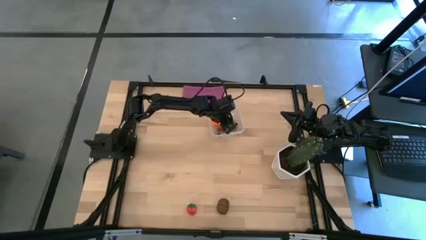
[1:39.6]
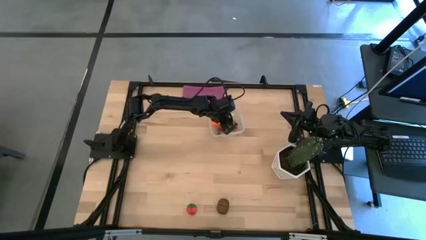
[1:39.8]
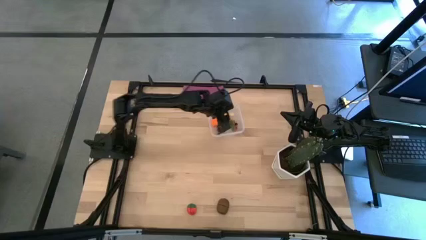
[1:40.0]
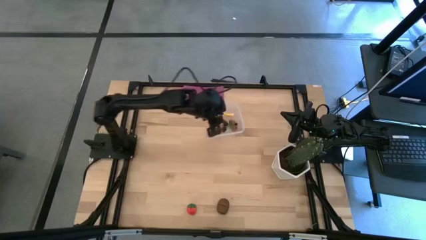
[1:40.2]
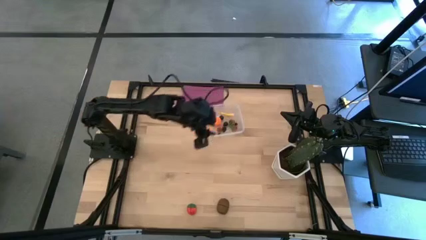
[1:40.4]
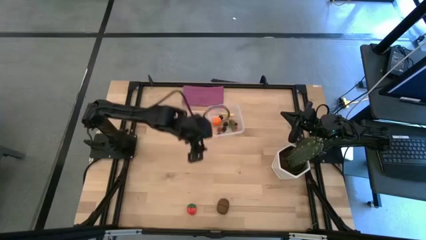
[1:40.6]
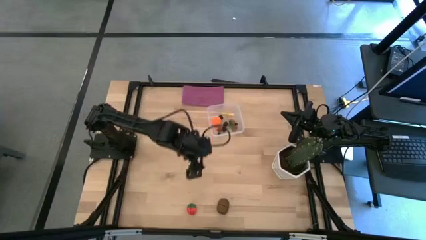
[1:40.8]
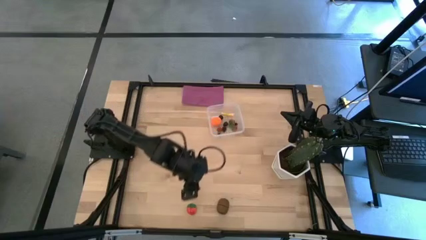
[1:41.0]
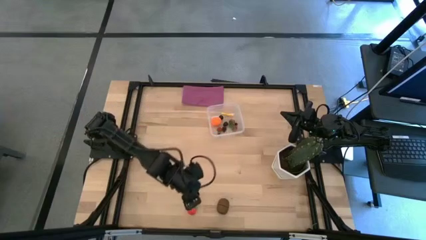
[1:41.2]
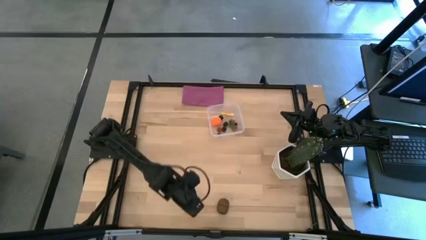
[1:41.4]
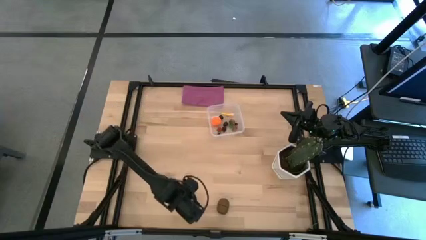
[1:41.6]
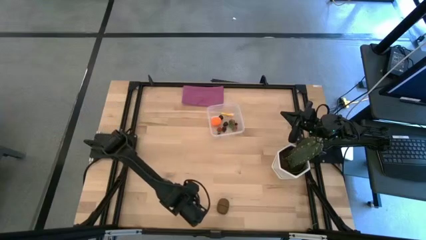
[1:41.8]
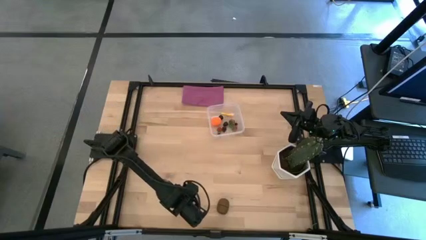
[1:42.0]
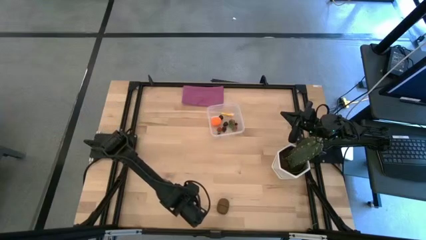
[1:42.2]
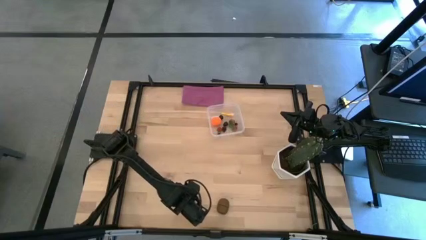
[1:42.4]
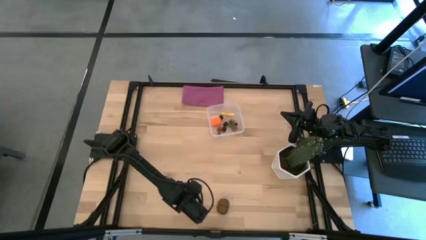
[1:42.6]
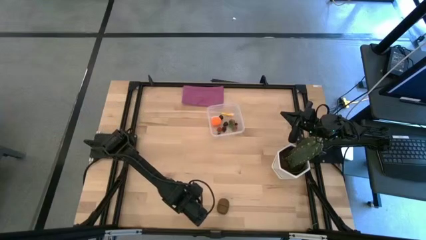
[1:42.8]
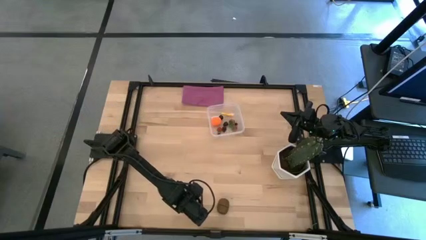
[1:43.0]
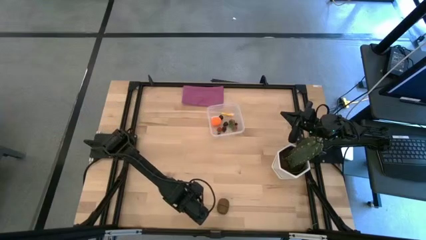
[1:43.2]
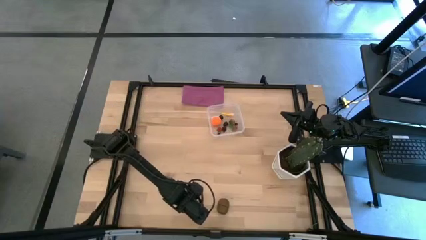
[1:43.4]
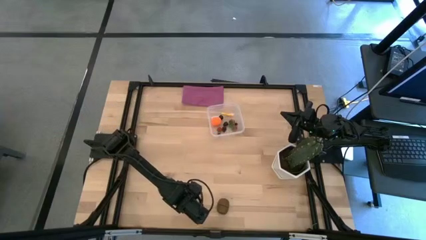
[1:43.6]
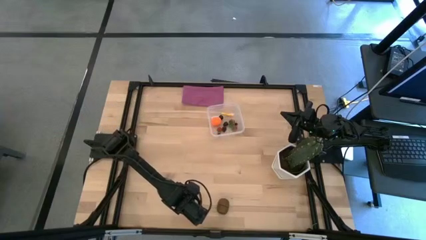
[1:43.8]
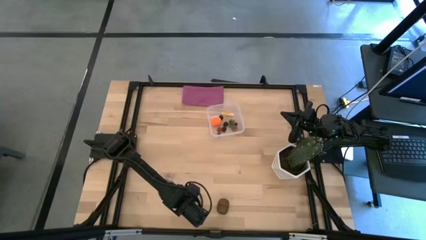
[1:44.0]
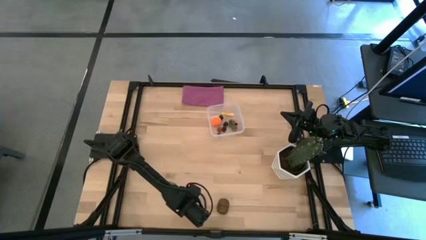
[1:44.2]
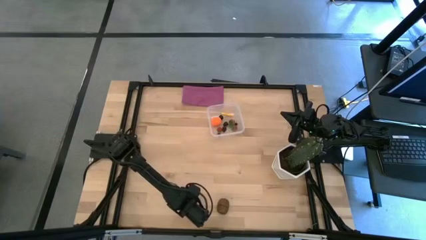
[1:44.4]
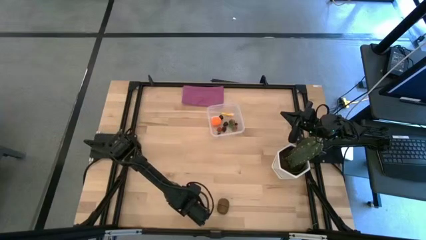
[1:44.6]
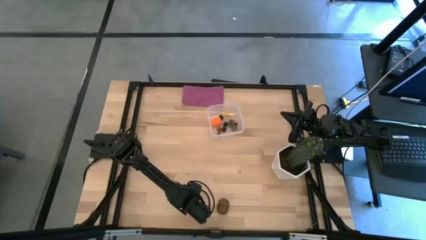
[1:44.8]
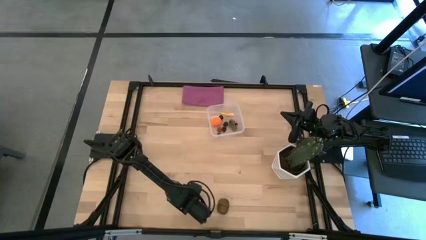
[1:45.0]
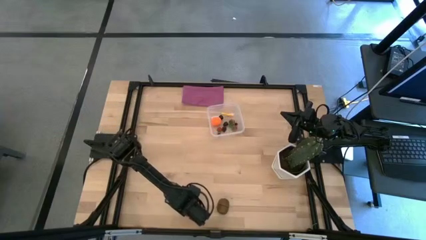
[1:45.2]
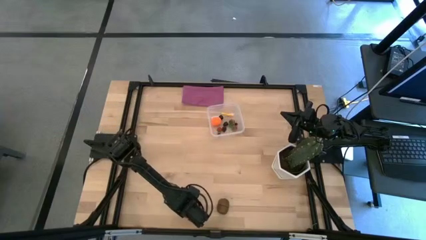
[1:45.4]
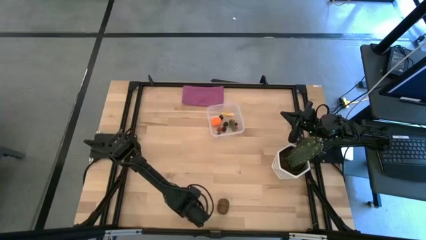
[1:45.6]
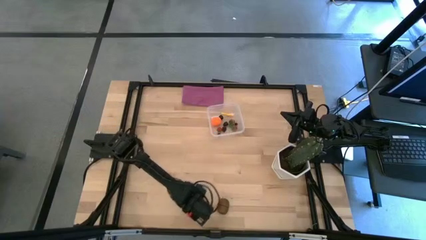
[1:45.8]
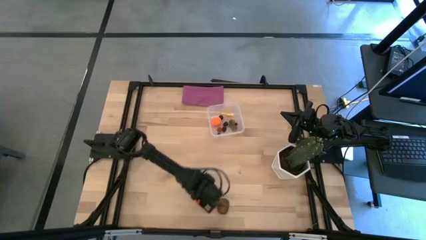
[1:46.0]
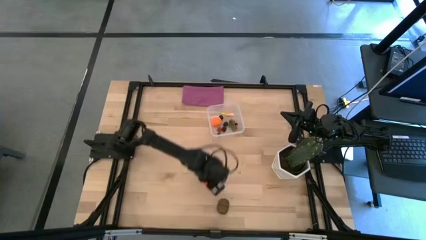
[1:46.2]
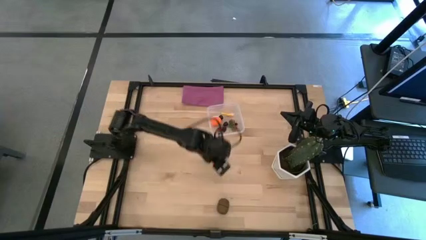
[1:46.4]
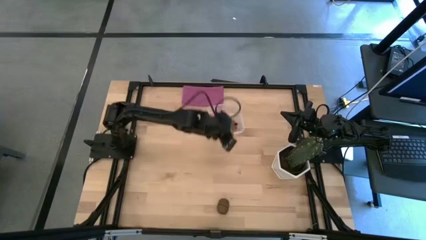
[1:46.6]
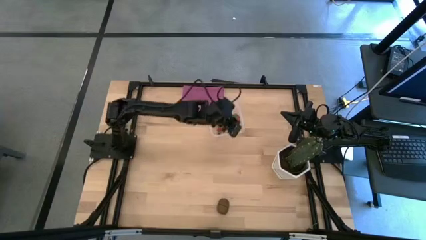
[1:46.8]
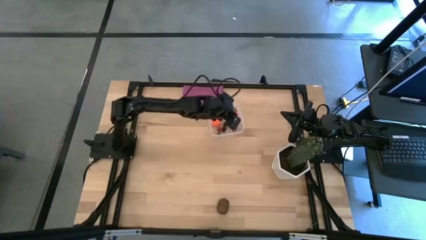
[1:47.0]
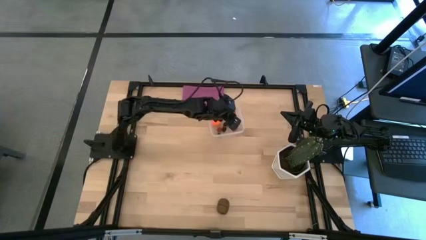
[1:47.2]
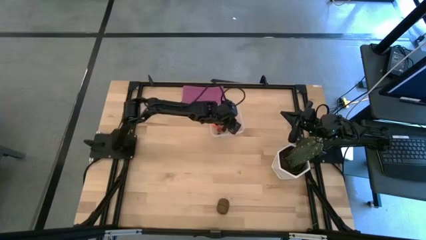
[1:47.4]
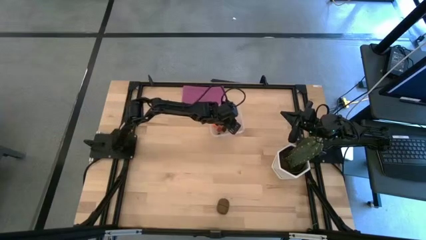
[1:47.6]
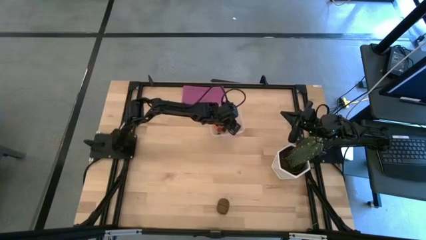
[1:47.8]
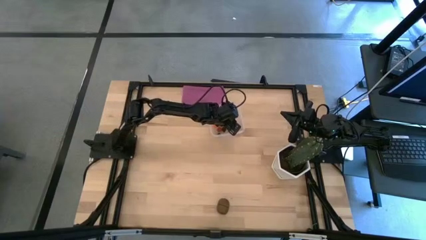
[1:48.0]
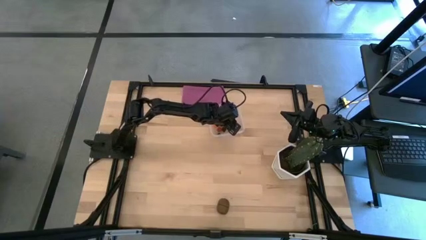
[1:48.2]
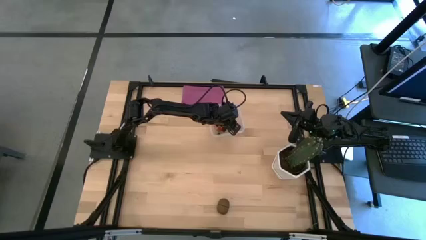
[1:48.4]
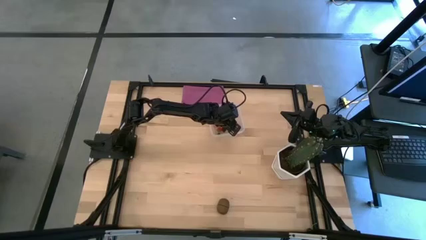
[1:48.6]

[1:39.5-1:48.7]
Task: Pick and placing Produce into tupperware
Put the red strawberry into the transparent bin

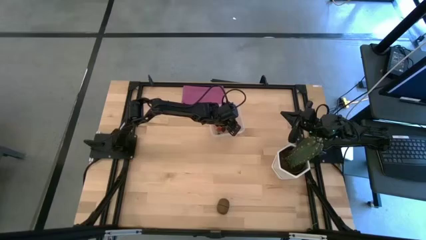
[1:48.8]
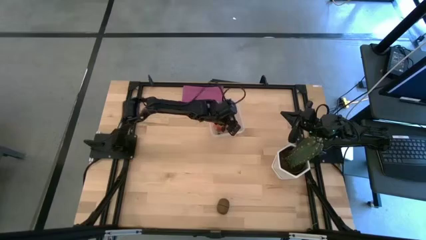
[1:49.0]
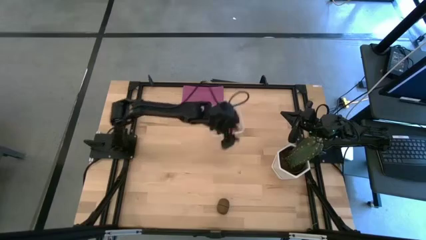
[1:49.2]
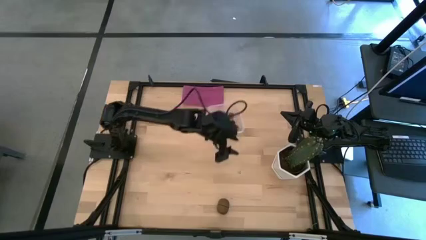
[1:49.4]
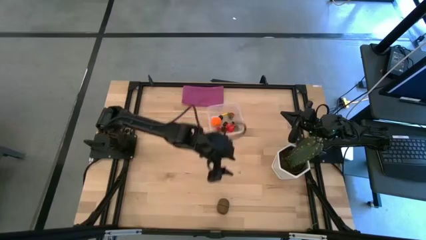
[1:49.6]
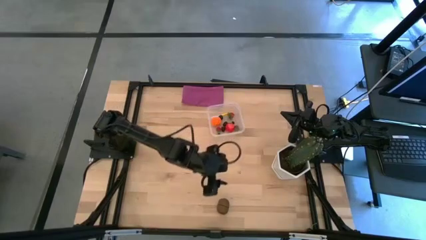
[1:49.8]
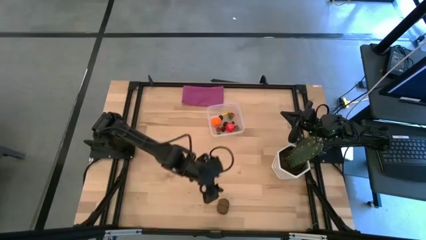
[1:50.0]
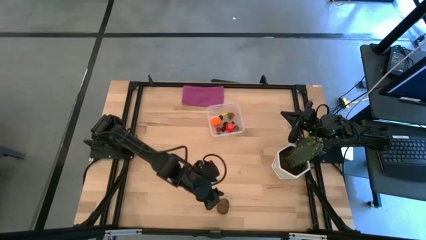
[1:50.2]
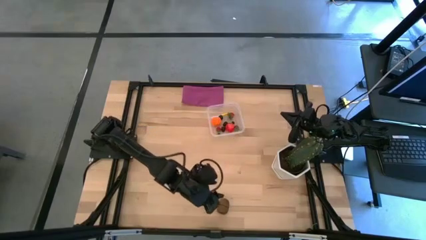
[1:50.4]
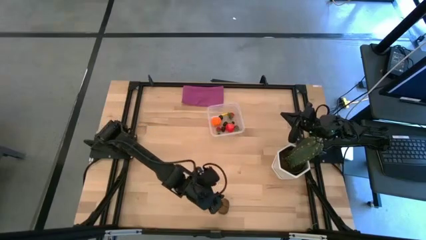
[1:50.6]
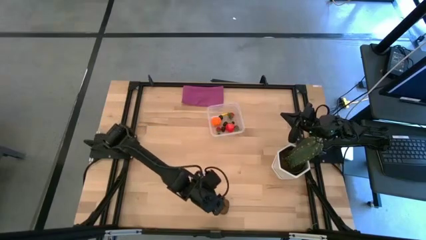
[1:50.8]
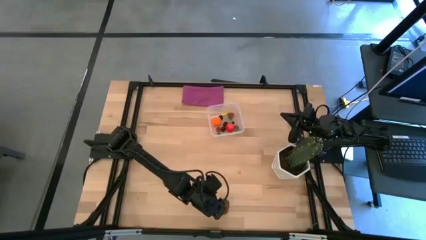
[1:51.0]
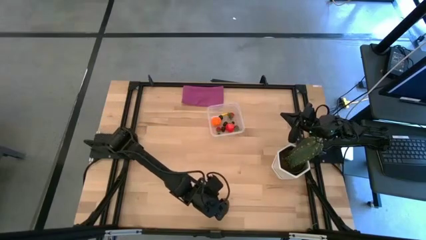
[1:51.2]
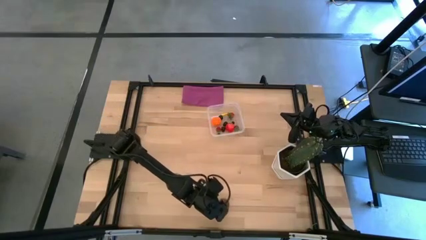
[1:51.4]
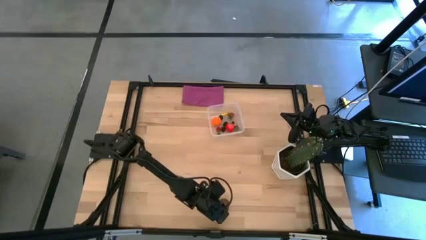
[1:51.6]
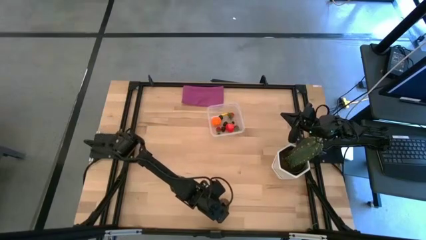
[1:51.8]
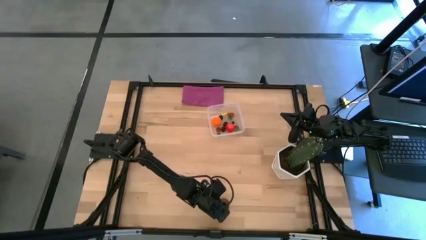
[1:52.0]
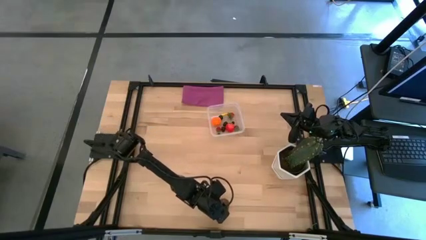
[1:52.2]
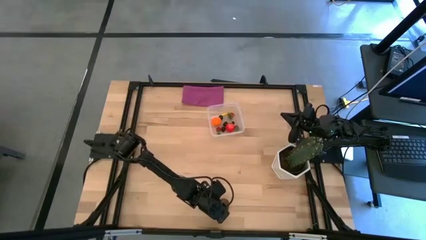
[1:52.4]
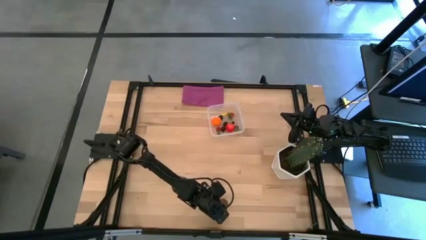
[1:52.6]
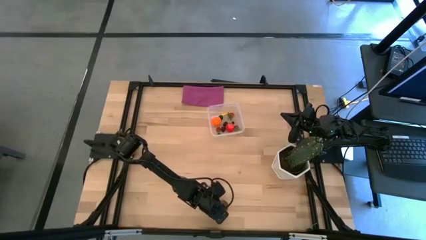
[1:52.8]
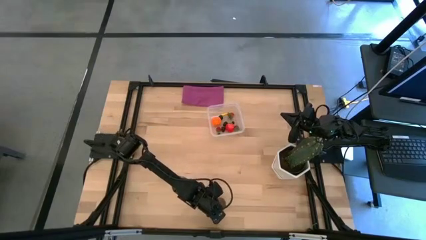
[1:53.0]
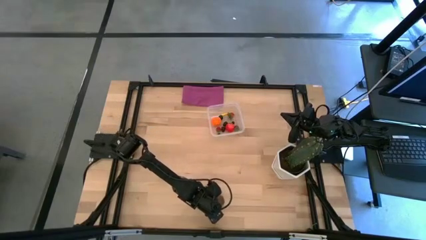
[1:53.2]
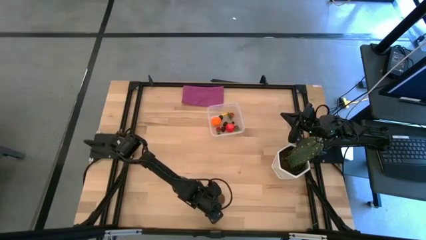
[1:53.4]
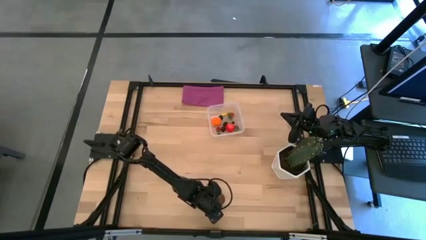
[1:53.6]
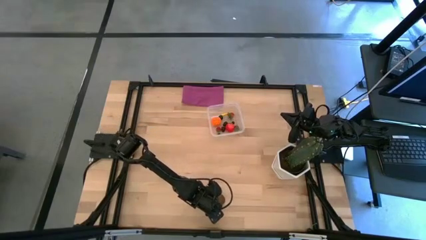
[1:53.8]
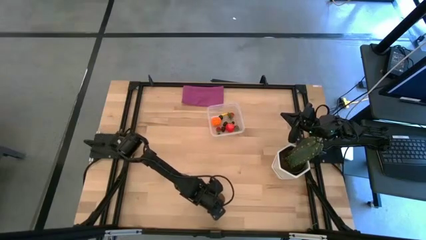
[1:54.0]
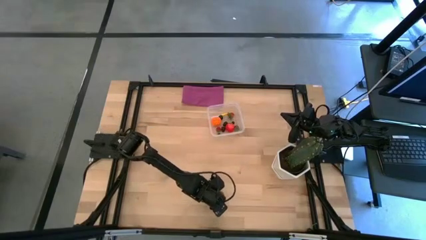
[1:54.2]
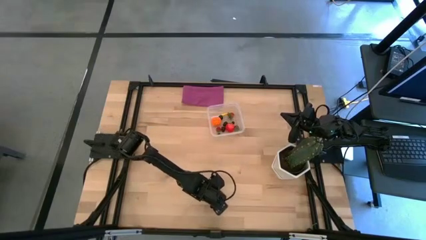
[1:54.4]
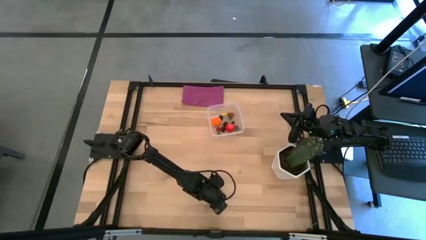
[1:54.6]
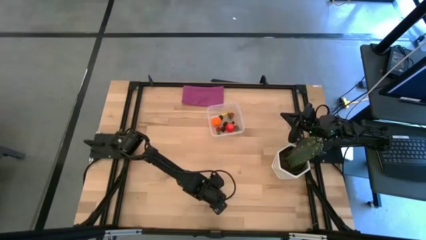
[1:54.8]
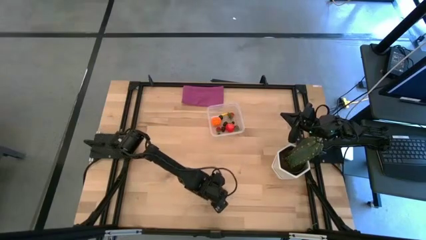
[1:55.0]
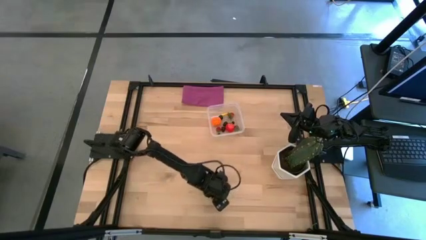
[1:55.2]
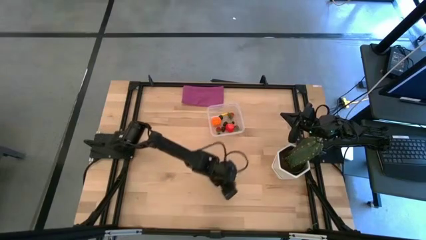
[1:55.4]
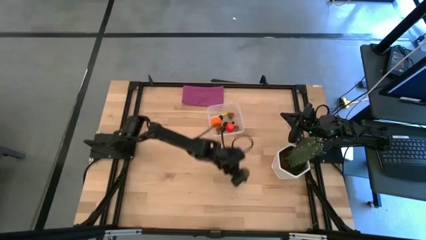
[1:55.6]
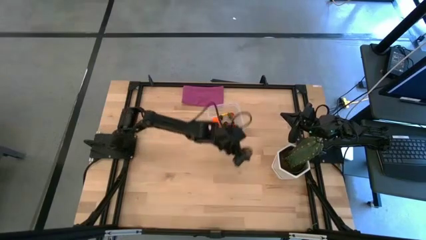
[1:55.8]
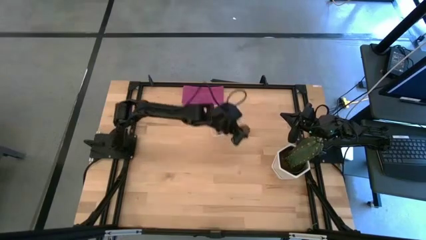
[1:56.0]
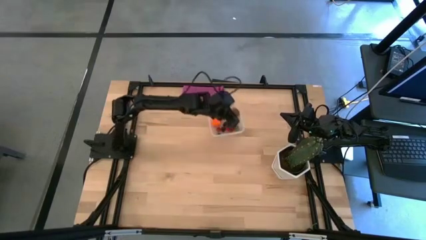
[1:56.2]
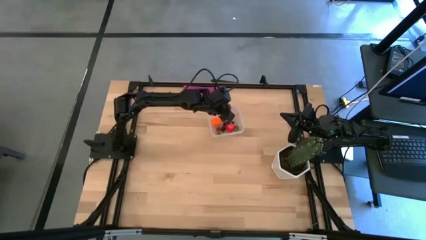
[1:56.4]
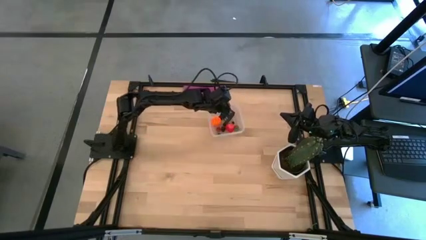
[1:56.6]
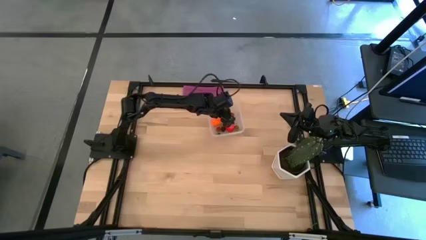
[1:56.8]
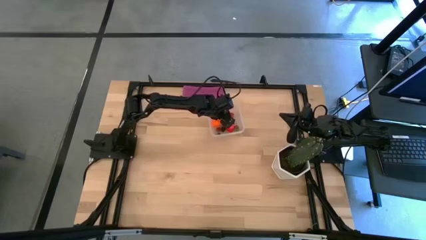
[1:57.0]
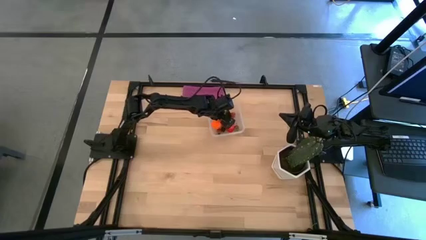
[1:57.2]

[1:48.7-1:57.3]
Put the brown kiwi into the transparent bin
